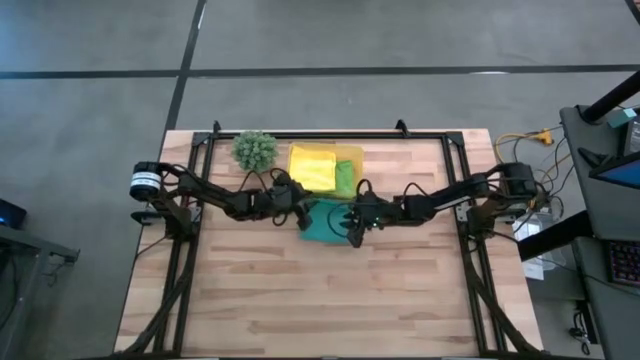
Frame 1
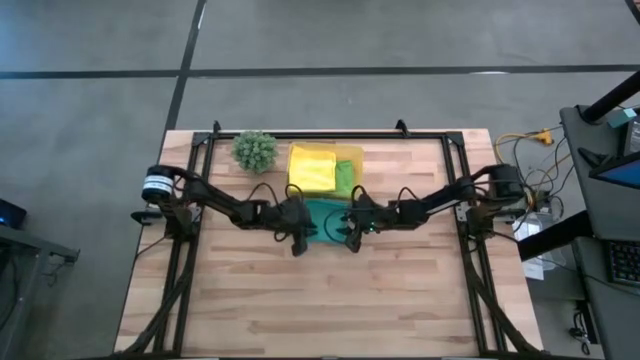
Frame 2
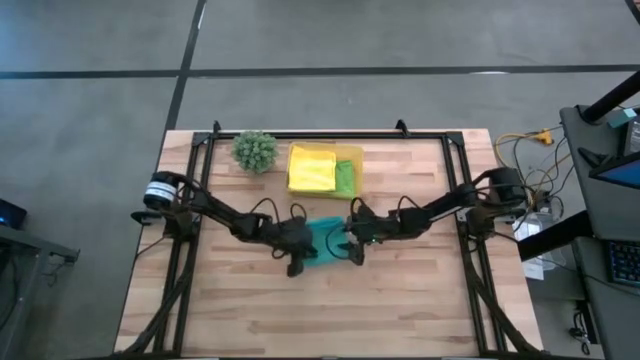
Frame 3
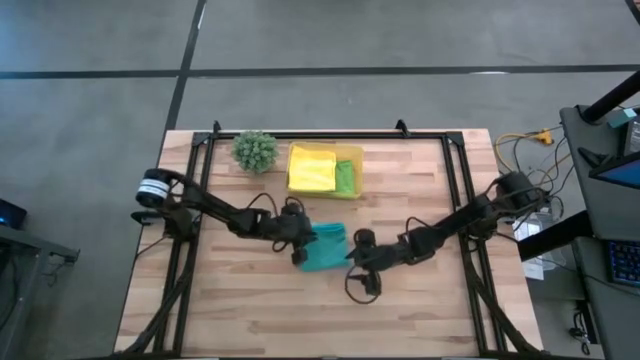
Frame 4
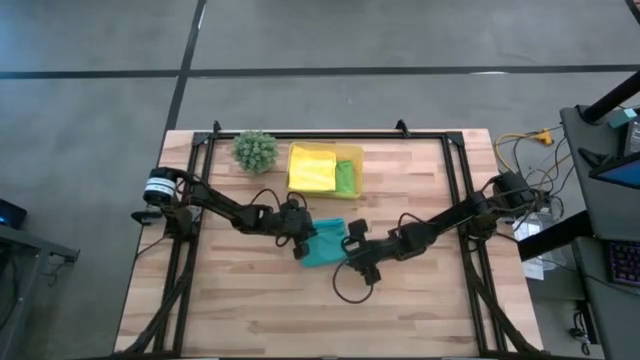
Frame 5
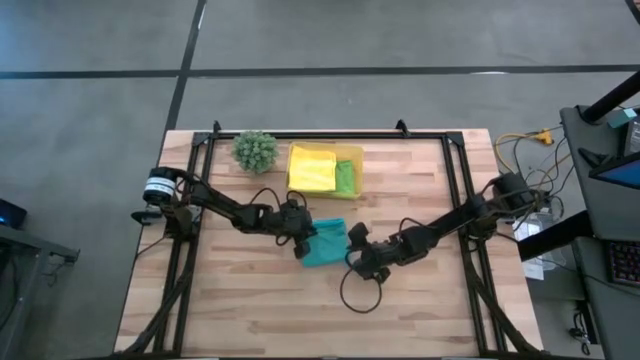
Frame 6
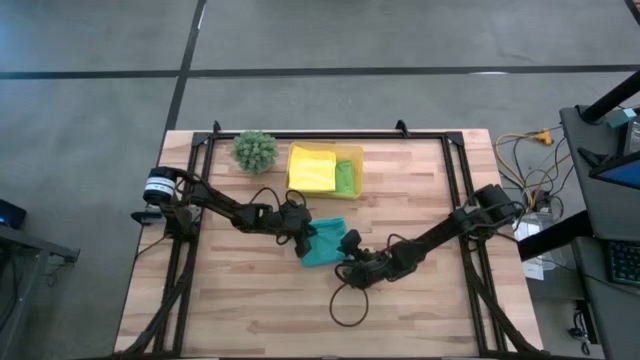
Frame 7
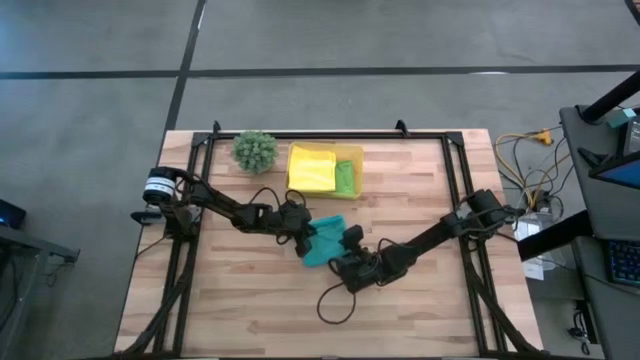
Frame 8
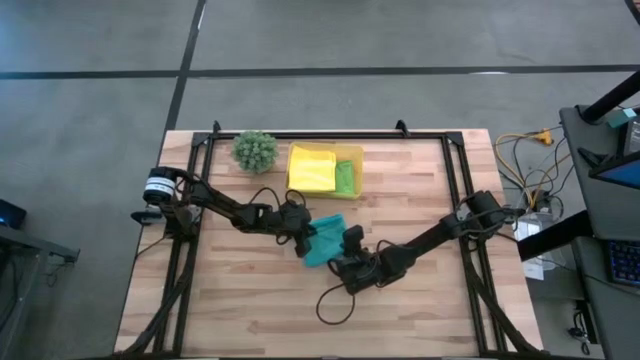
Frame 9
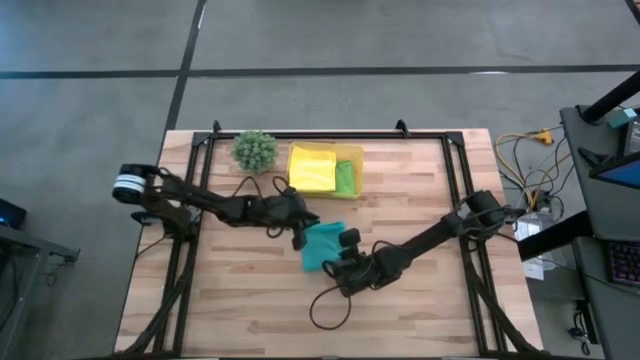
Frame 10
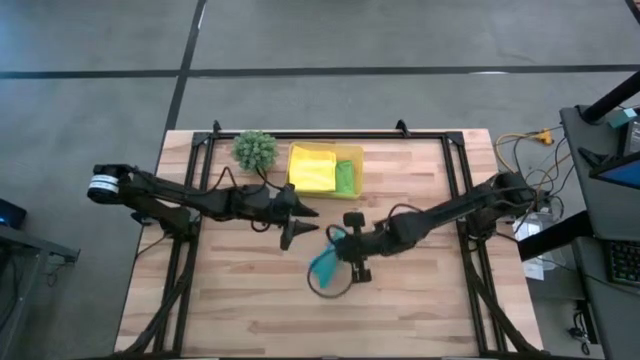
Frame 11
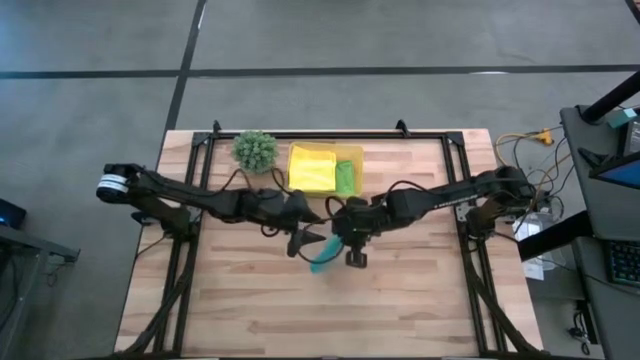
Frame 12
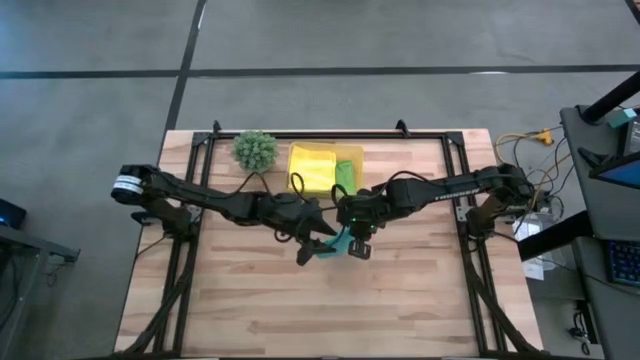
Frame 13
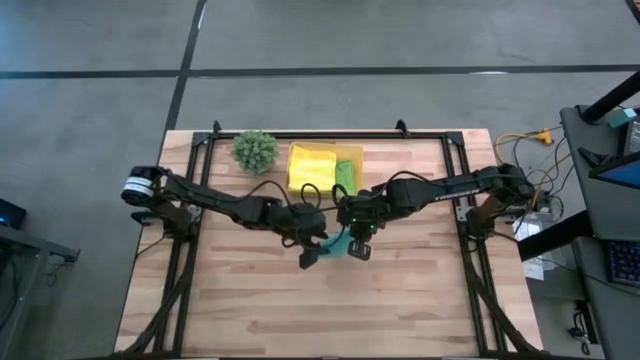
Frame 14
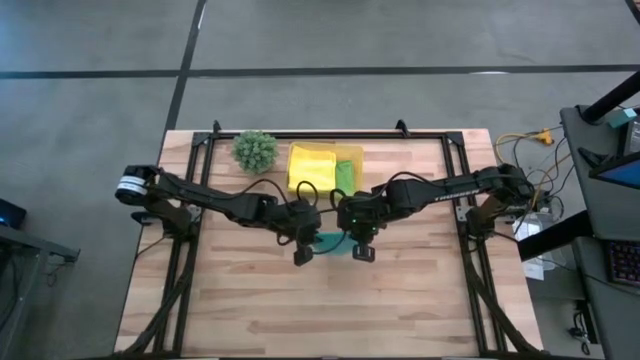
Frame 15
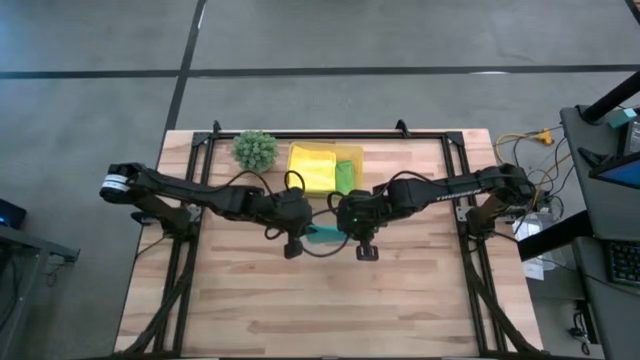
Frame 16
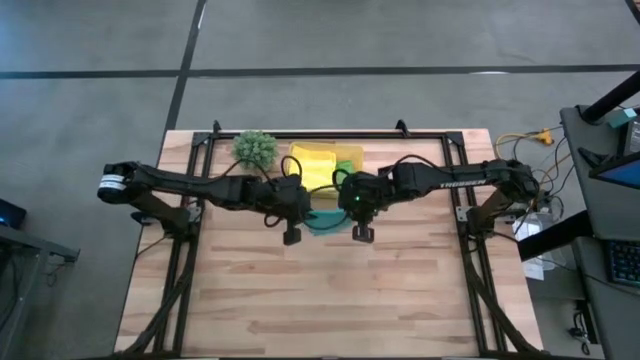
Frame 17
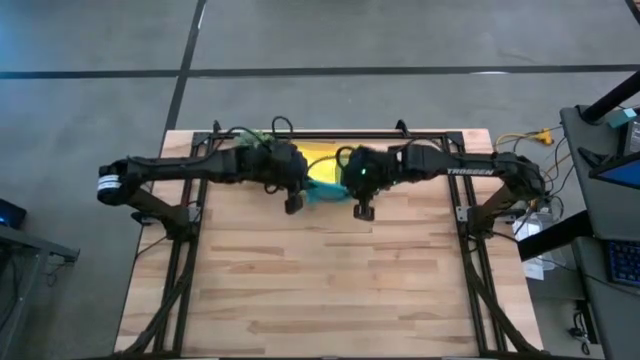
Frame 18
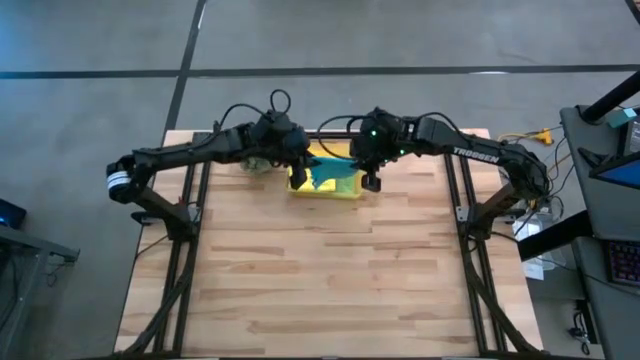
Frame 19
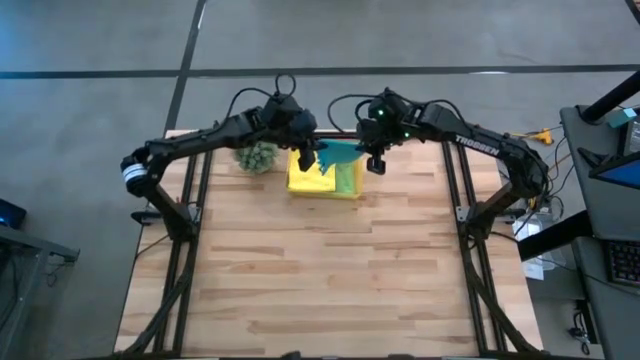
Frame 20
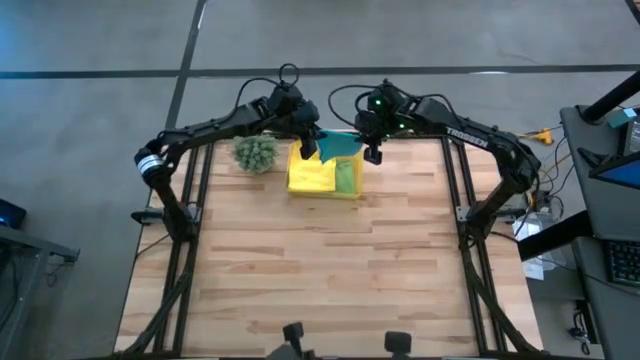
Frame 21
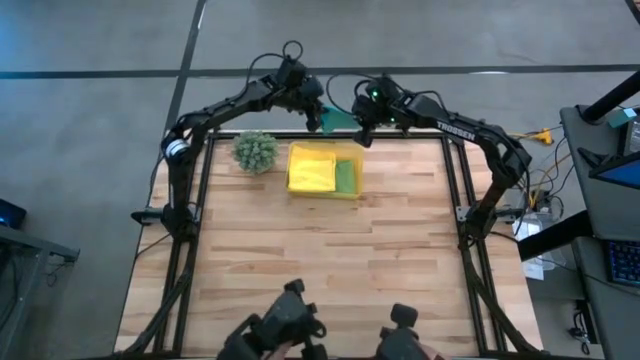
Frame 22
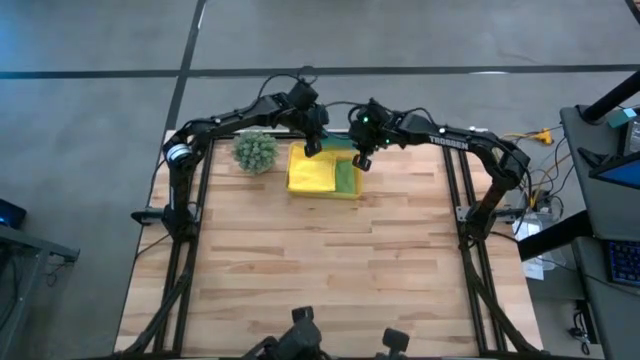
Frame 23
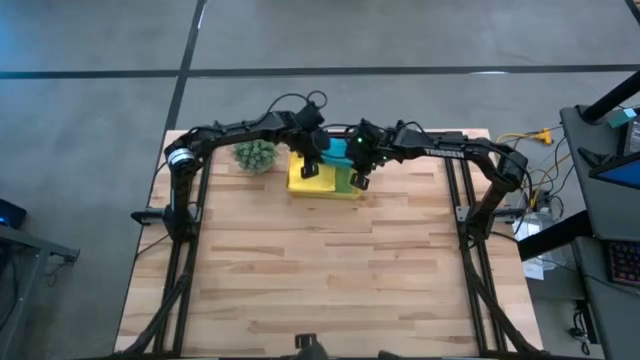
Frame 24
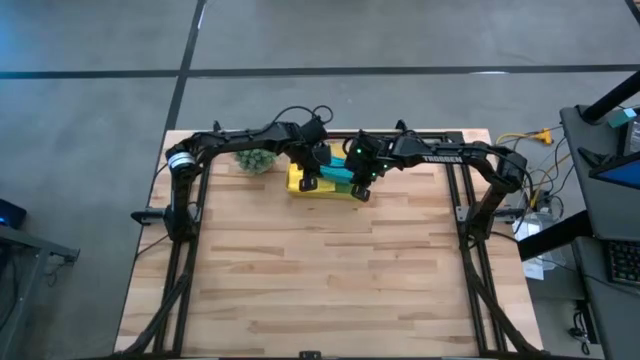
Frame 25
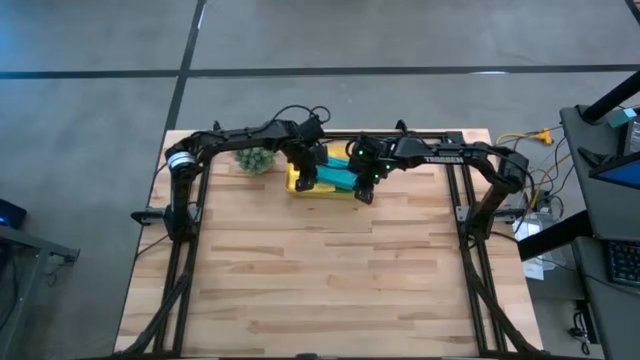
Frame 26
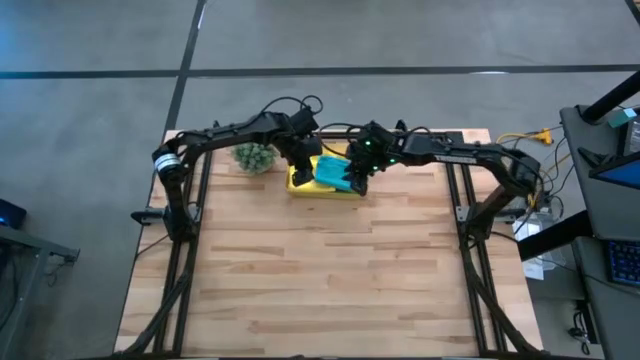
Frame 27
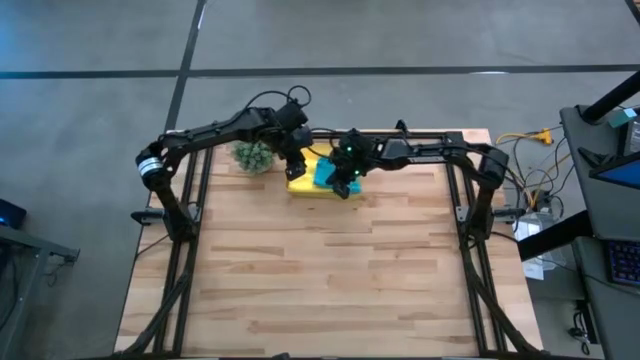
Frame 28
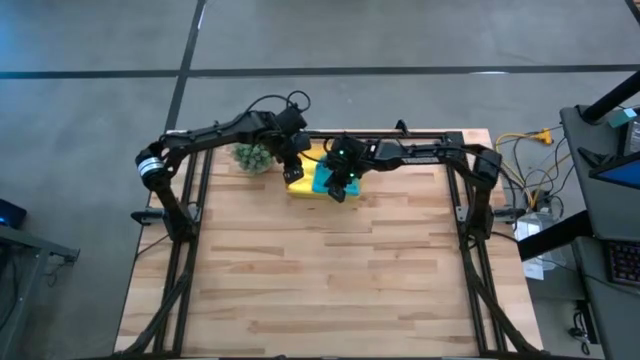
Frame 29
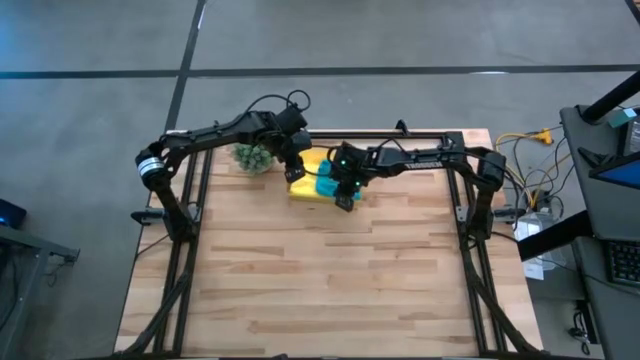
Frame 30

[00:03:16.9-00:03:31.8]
Task: Fold microfiber towels
Put the light blue towel into the yellow bin

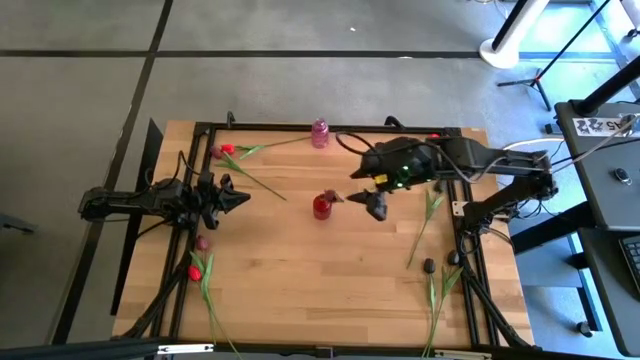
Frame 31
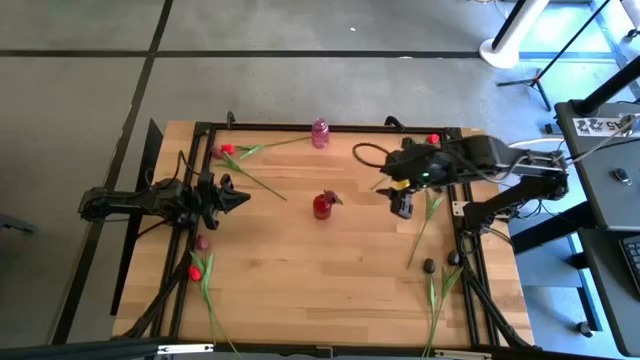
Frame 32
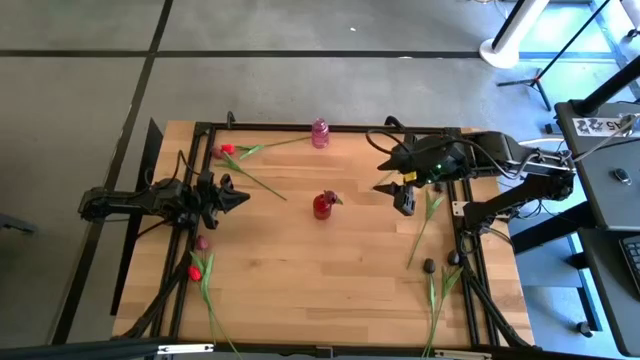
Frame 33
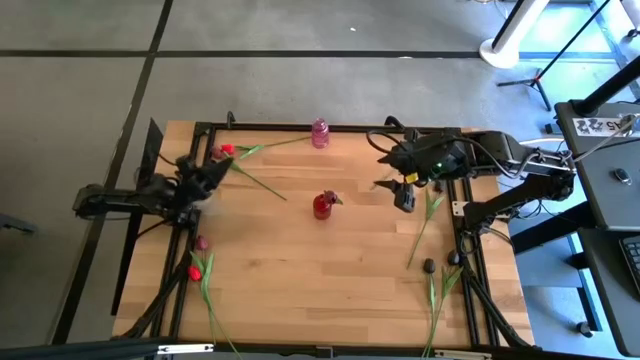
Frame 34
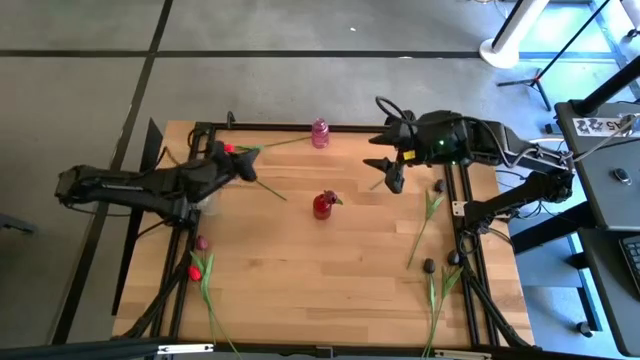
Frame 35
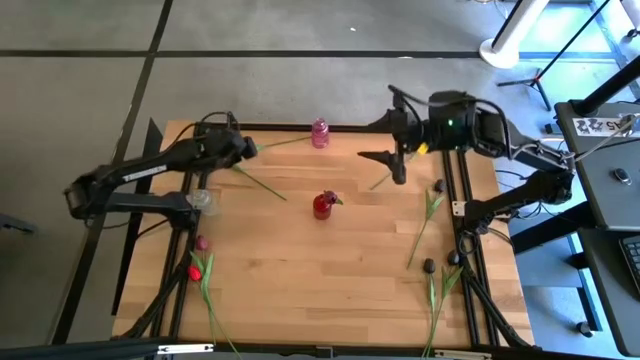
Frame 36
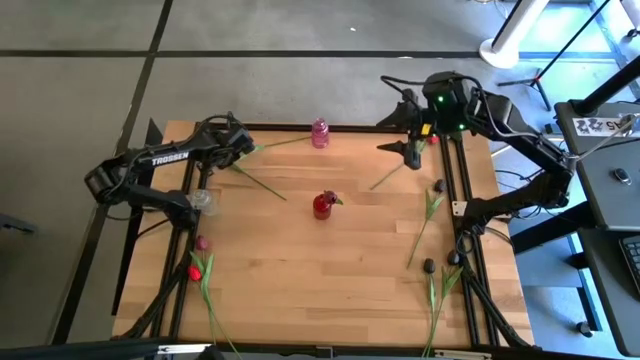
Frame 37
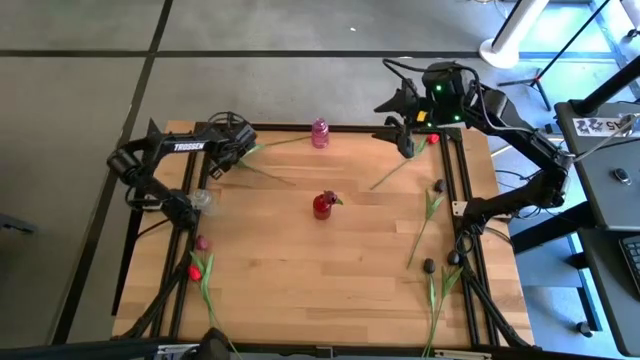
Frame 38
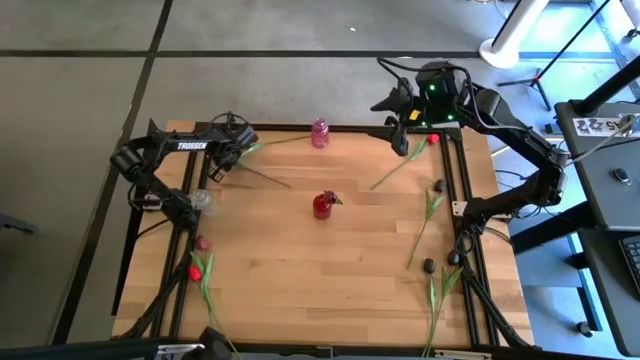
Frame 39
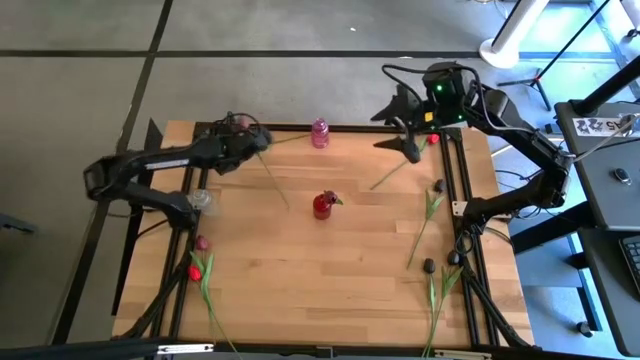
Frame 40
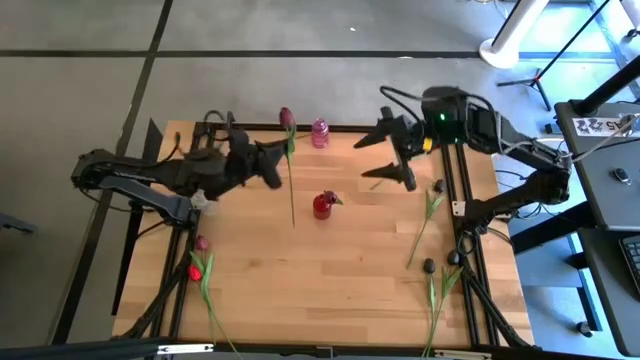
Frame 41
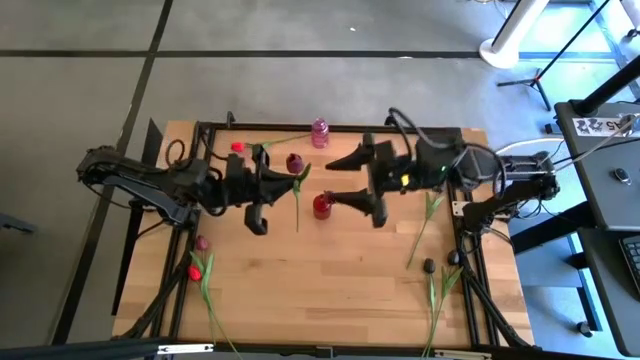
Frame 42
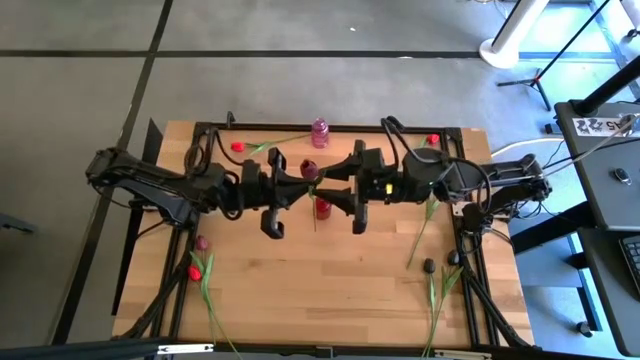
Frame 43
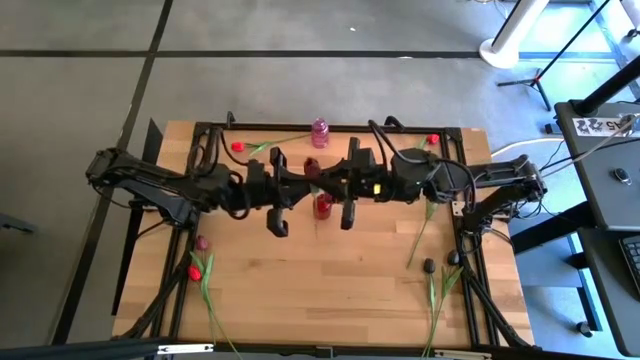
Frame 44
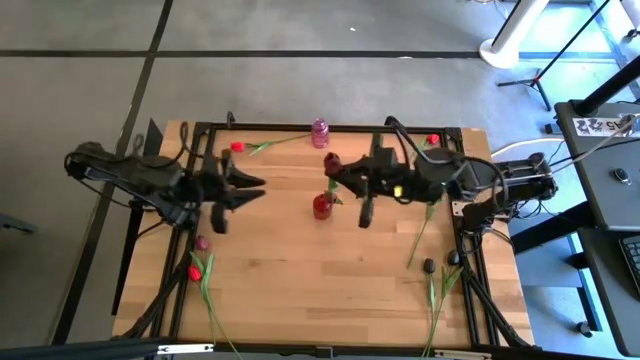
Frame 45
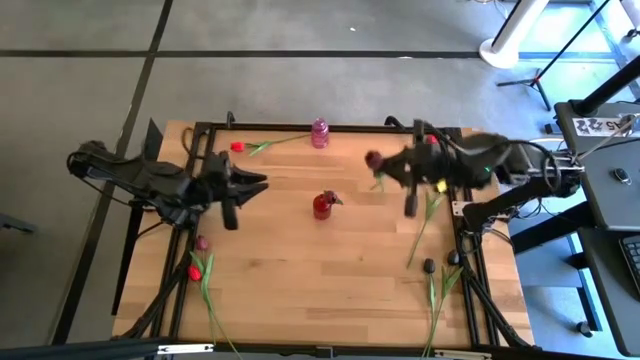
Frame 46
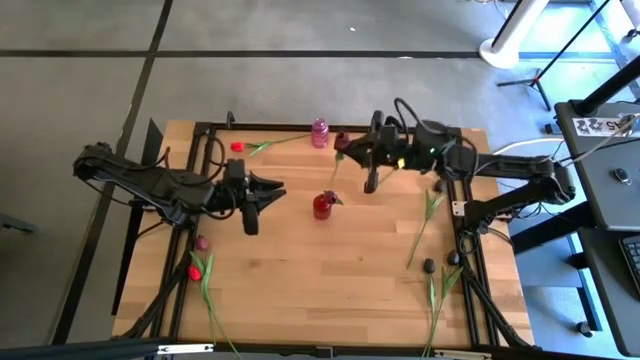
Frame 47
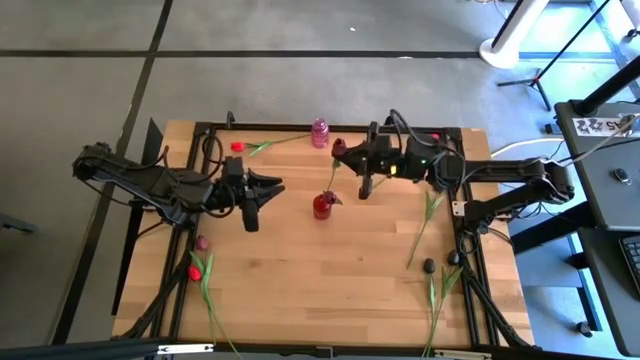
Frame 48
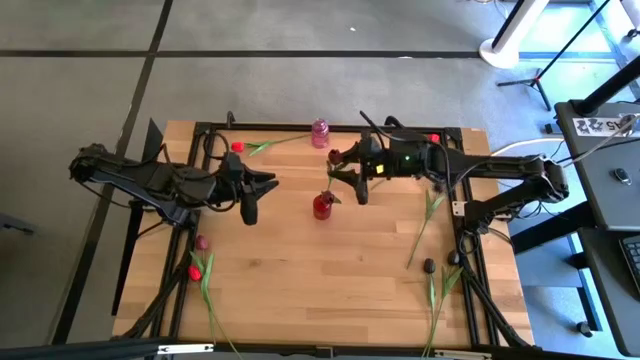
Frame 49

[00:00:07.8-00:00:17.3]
Task: Sort flowers into vase by color
Put the top dark red flower into the red vase
